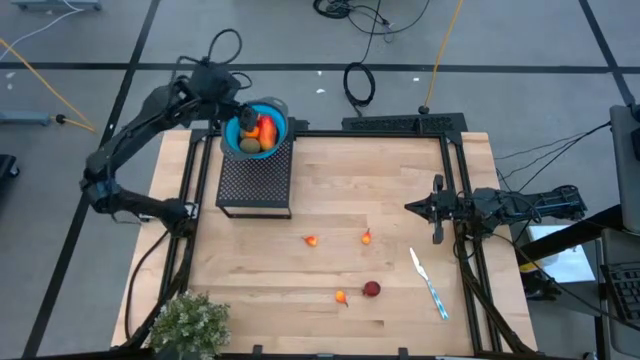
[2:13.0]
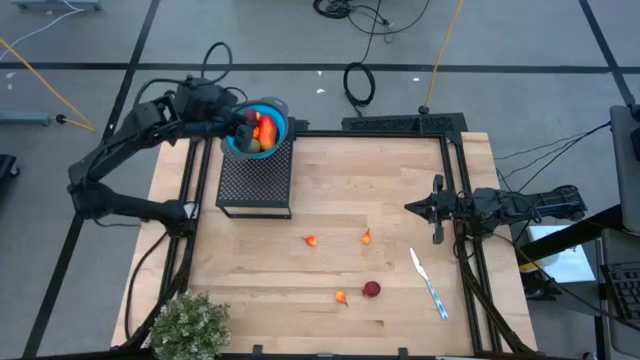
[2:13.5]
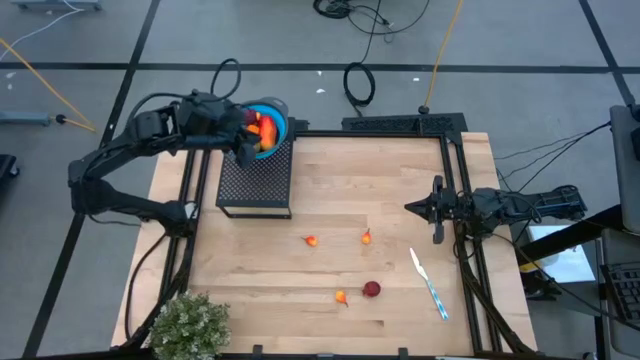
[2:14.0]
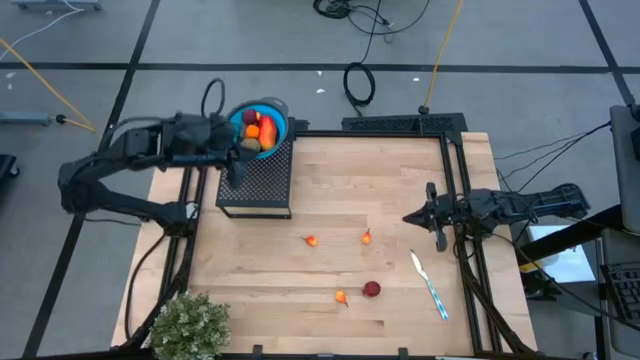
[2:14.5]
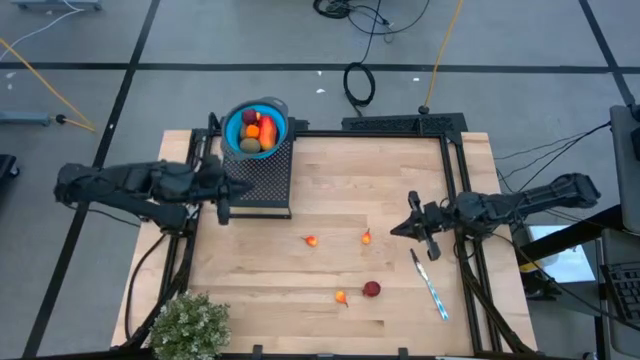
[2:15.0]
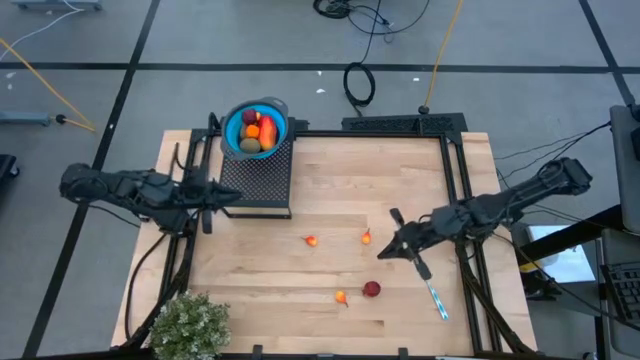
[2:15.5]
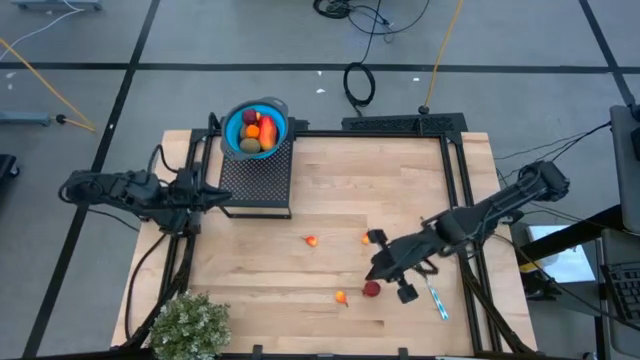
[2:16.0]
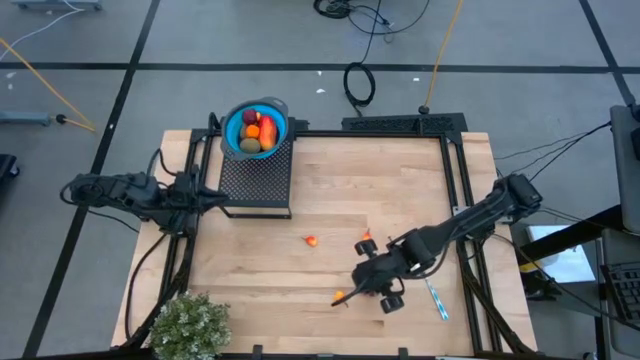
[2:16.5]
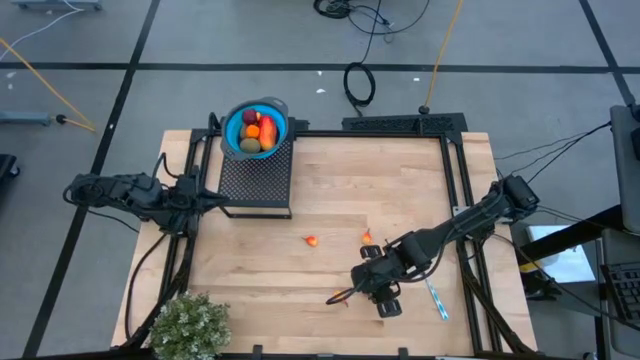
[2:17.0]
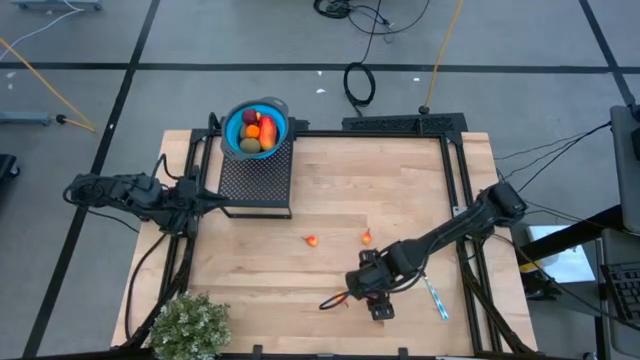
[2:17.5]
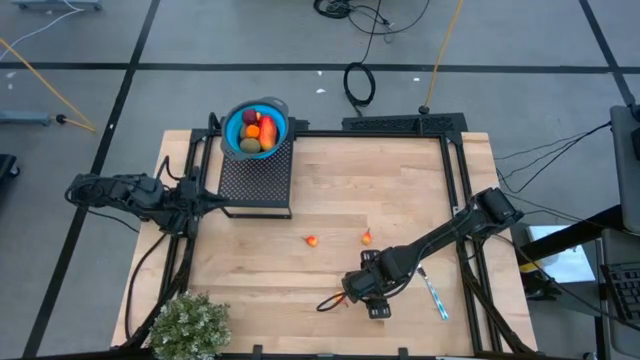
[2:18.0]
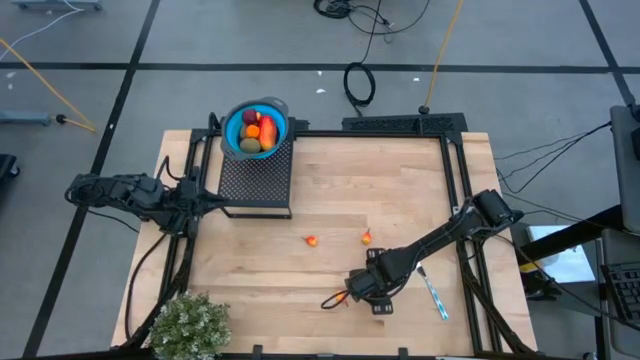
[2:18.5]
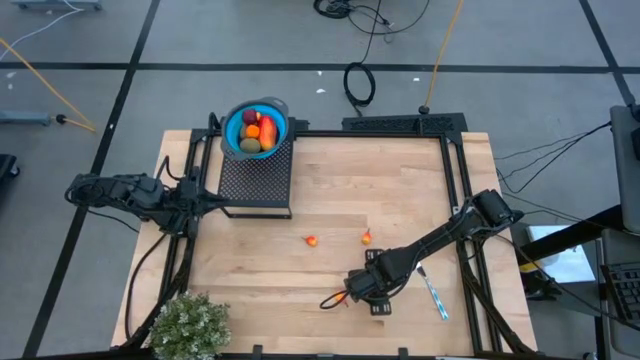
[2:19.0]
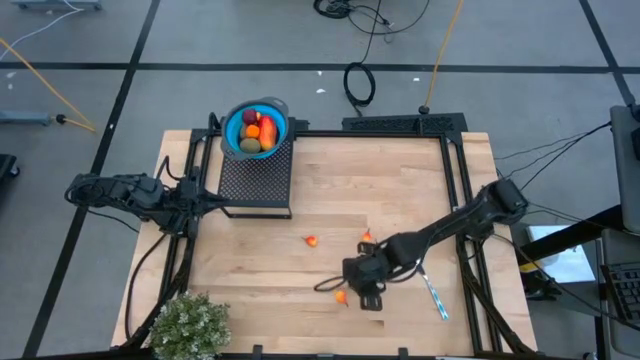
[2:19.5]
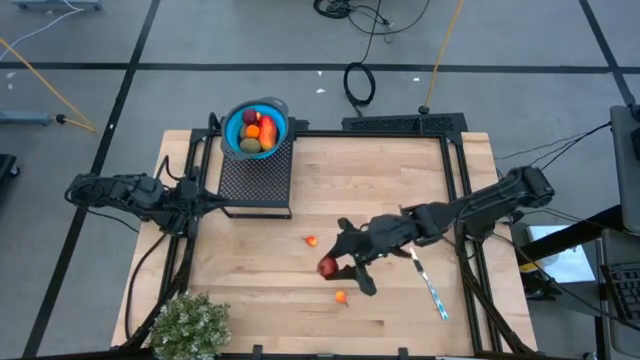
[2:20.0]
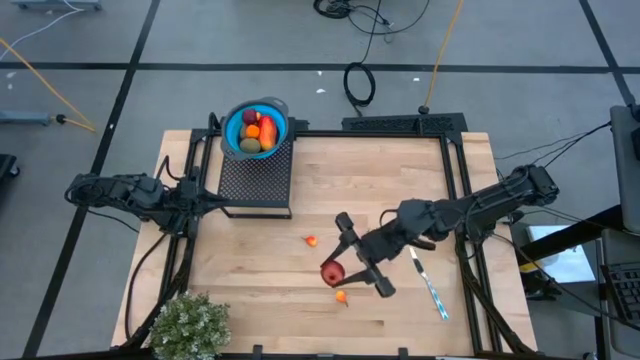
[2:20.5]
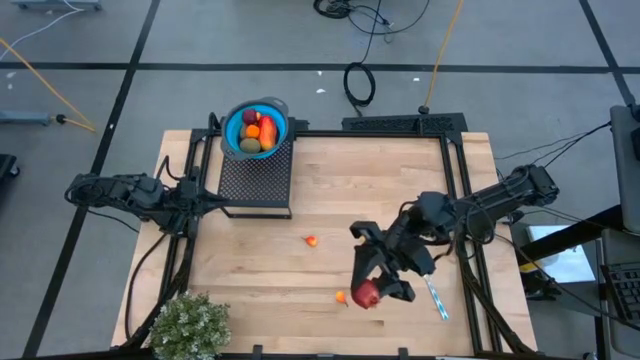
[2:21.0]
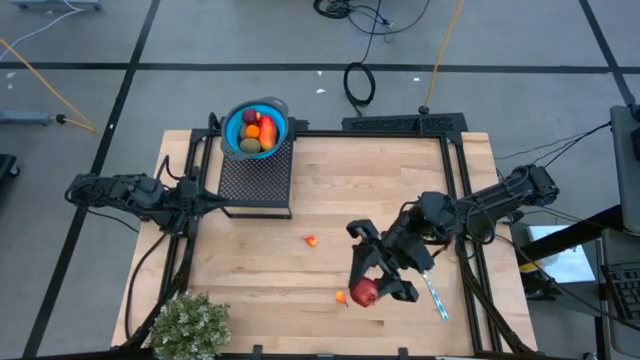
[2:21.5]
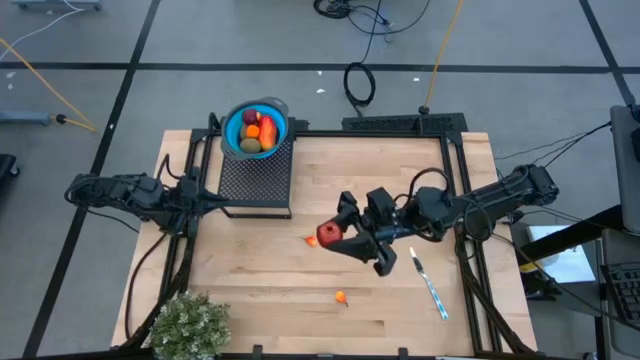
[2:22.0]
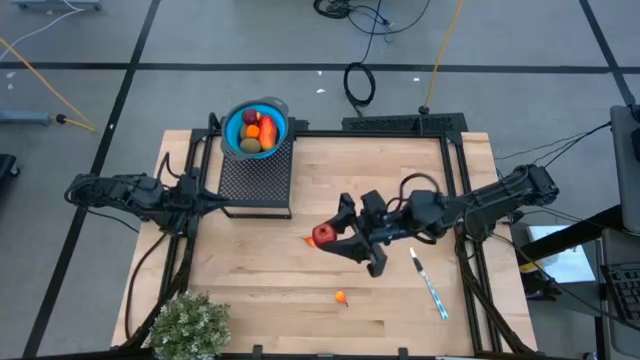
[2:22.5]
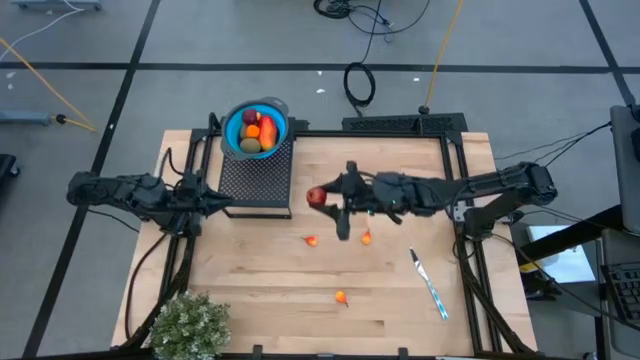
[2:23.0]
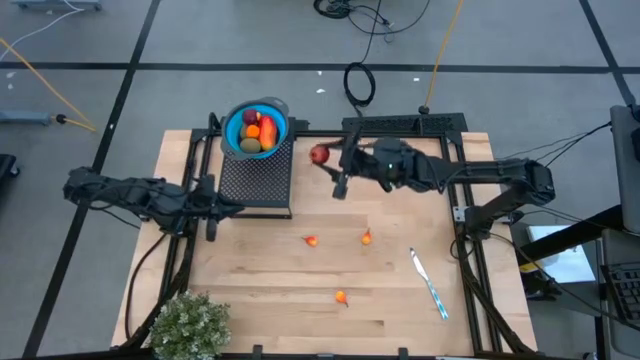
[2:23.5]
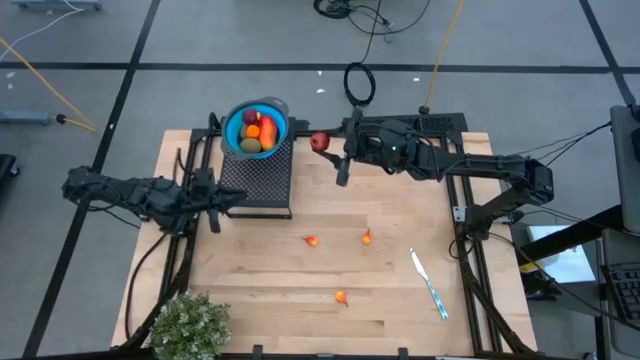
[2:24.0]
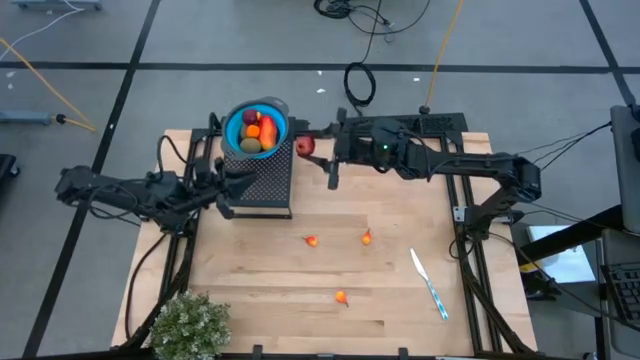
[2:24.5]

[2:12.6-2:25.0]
Task: Pick & Place Fruit
Put the pomegranate into the blue strainer bowl on the shelf

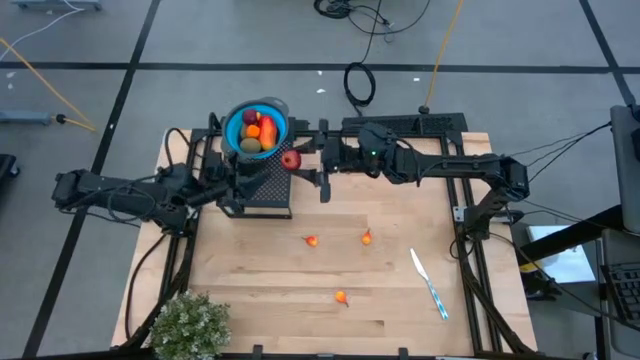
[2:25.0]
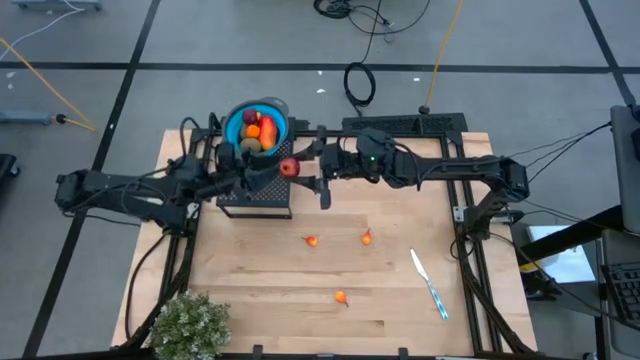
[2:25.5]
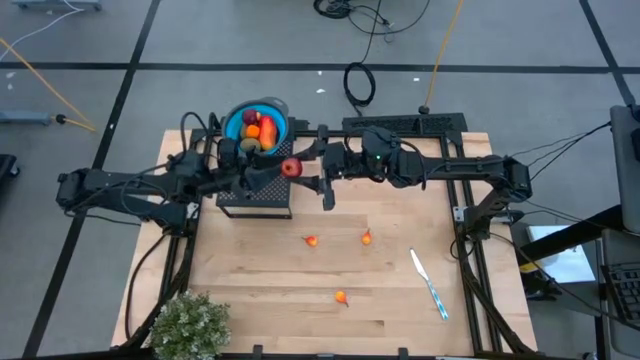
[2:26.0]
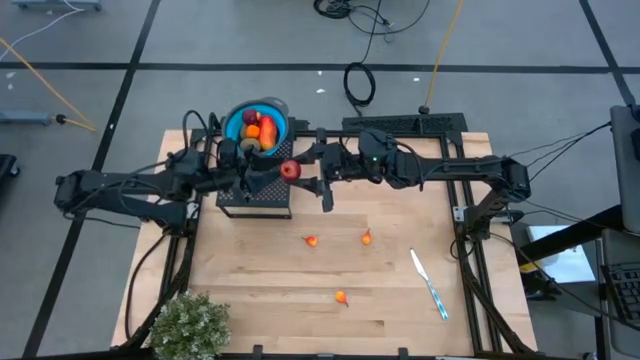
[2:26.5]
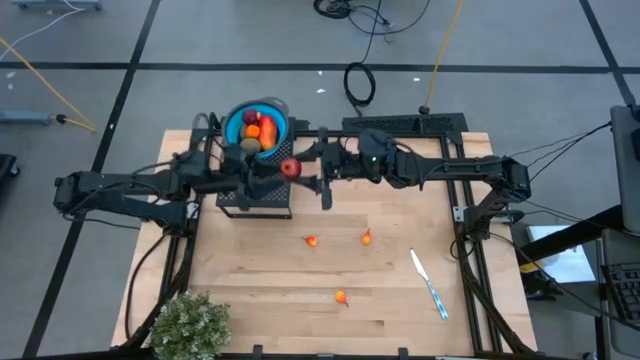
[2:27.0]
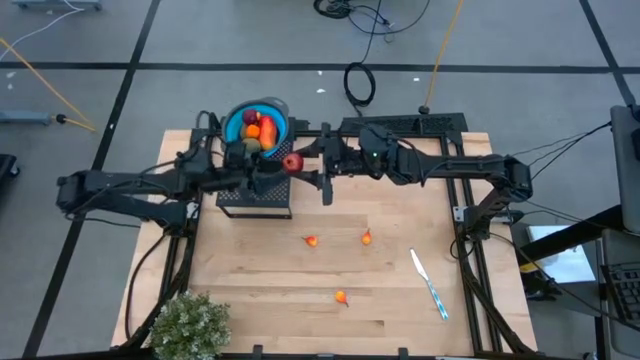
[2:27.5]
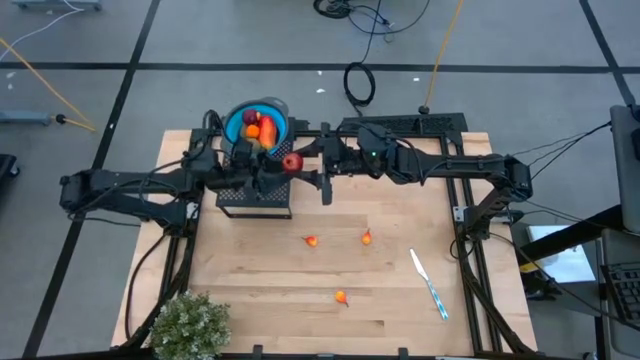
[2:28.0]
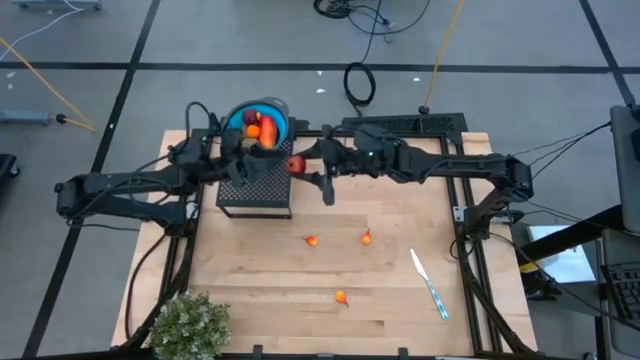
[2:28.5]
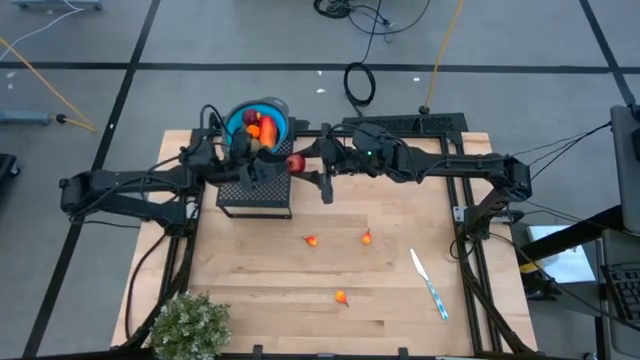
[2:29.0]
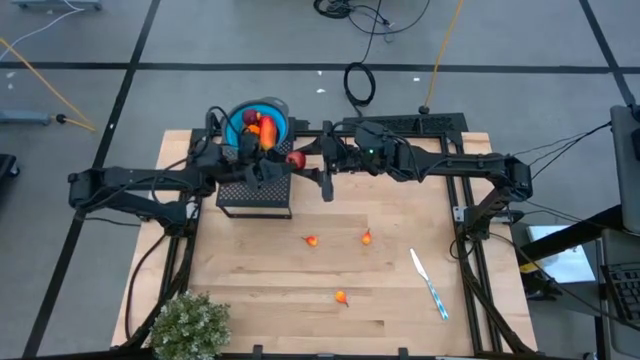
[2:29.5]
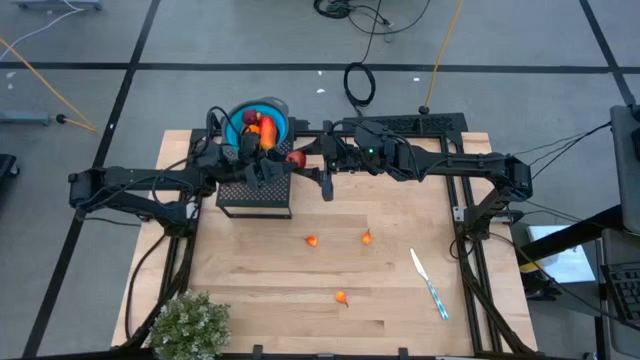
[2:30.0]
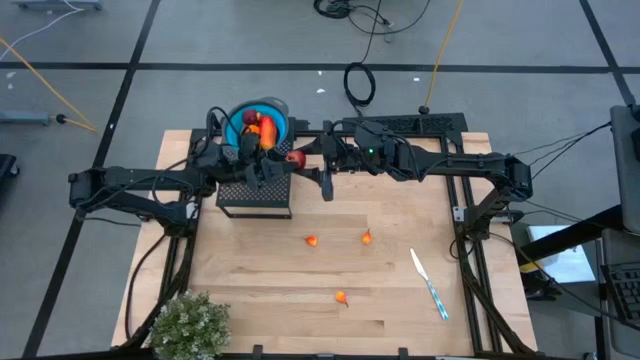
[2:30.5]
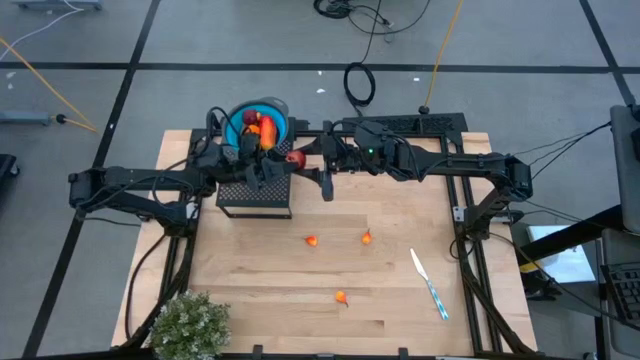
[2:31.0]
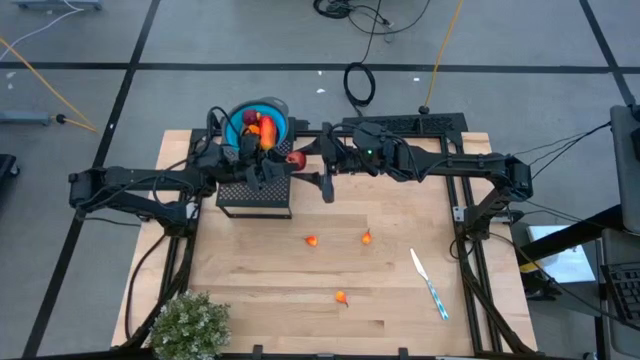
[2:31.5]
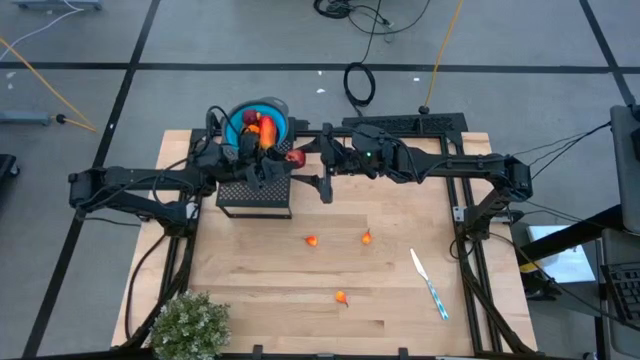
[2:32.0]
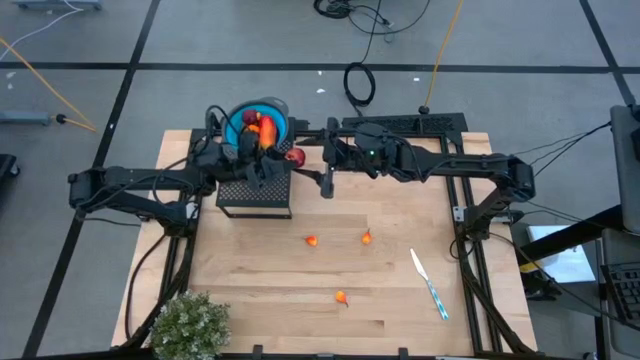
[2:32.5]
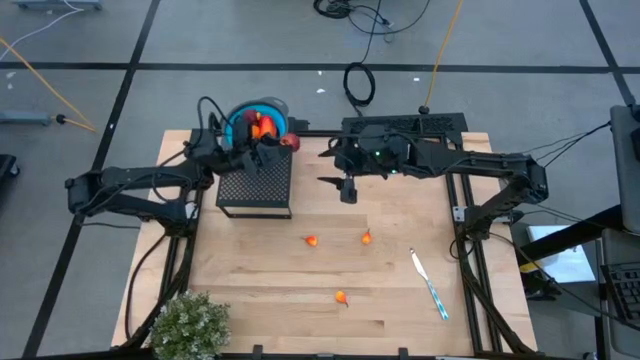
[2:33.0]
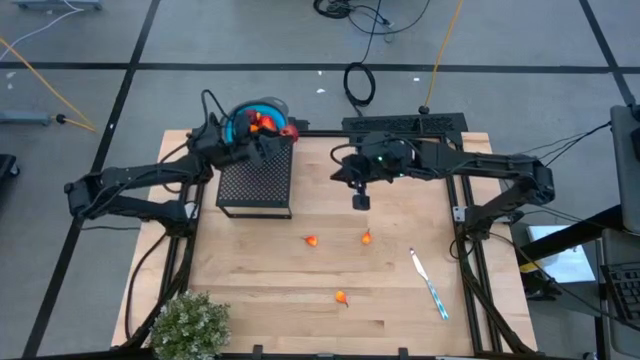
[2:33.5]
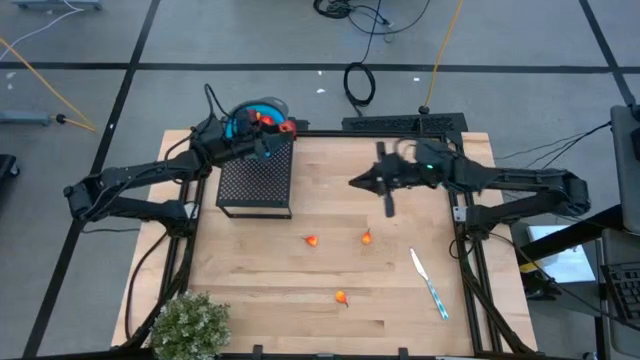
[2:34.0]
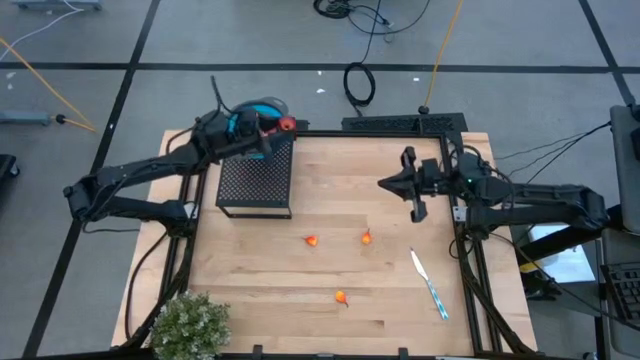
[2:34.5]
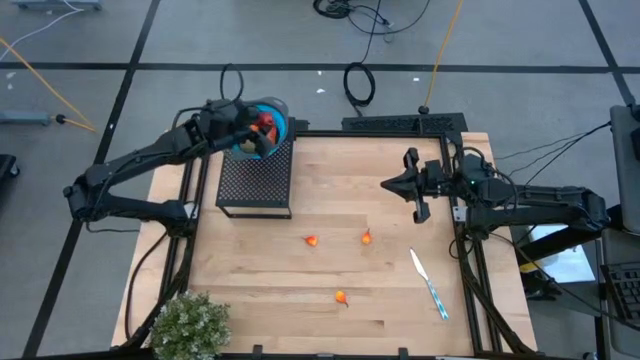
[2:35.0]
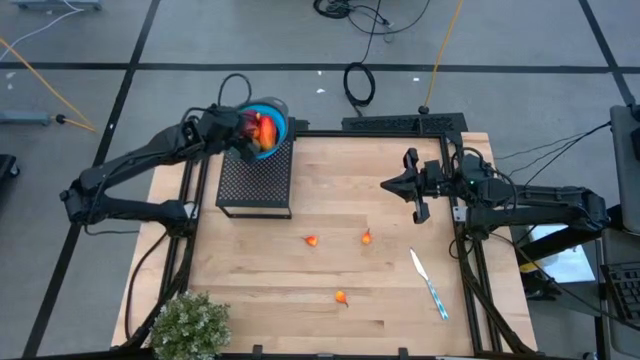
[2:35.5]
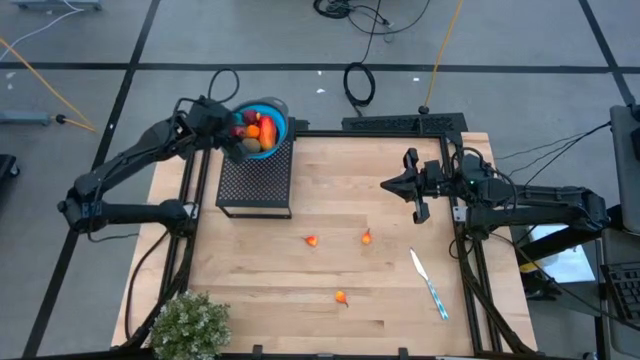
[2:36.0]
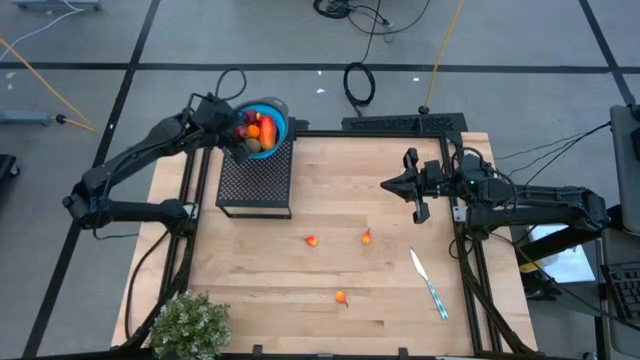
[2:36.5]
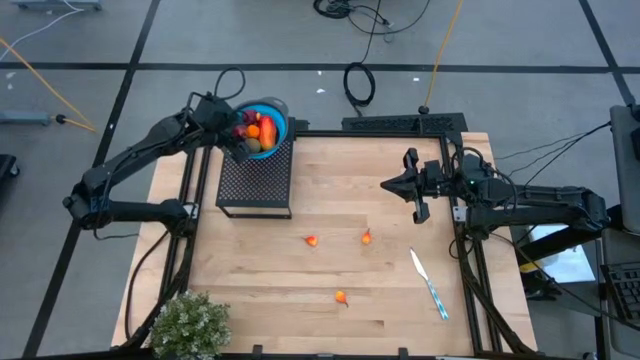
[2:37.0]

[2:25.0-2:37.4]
Put the pomegranate into the blue strainer bowl on the shelf
